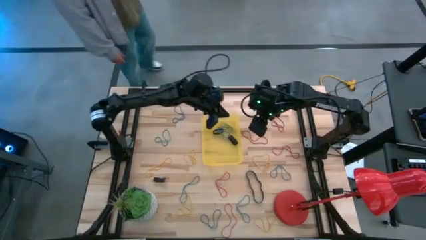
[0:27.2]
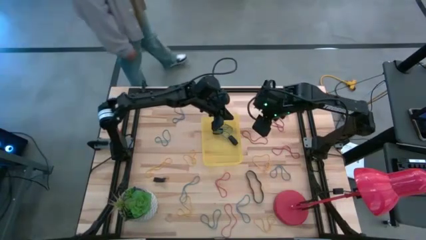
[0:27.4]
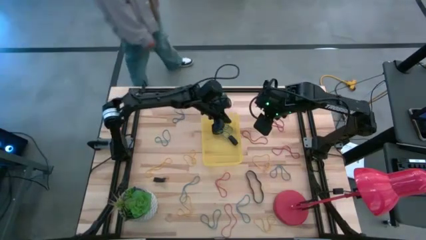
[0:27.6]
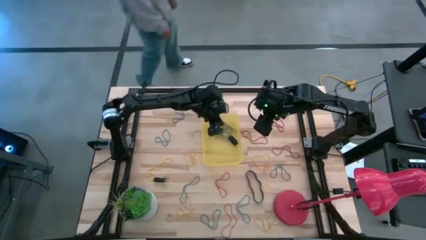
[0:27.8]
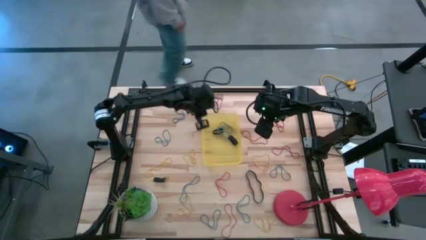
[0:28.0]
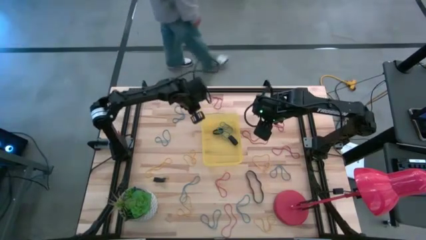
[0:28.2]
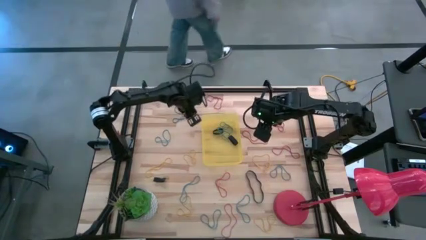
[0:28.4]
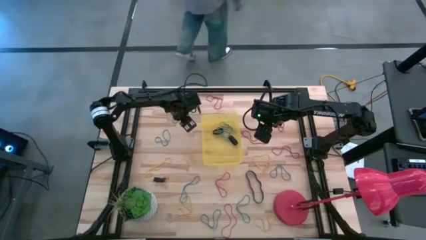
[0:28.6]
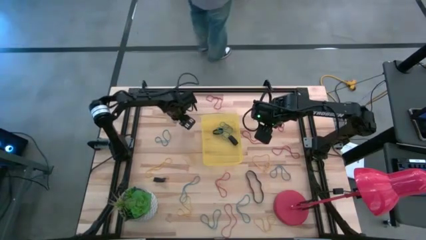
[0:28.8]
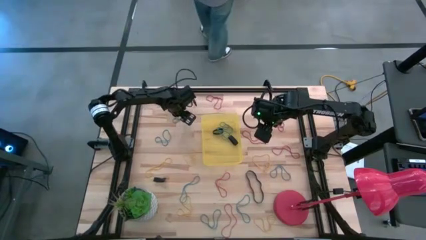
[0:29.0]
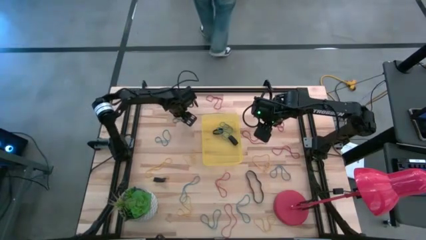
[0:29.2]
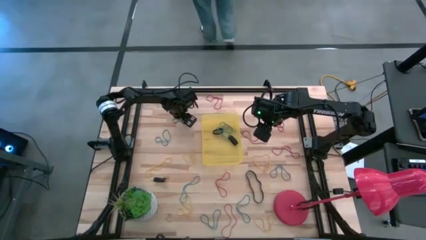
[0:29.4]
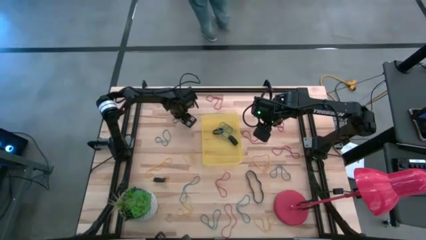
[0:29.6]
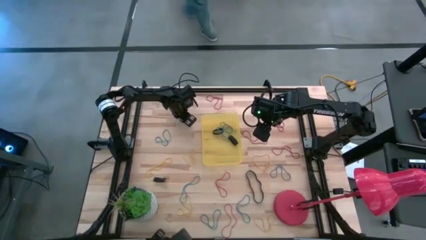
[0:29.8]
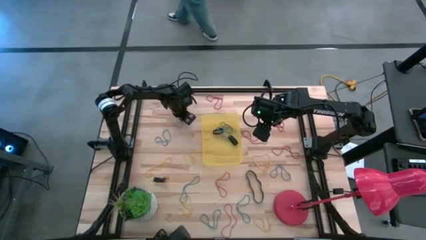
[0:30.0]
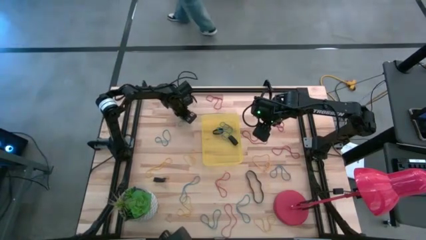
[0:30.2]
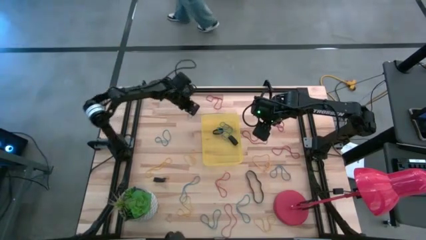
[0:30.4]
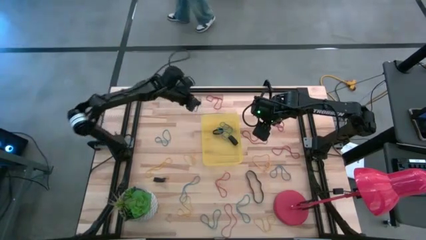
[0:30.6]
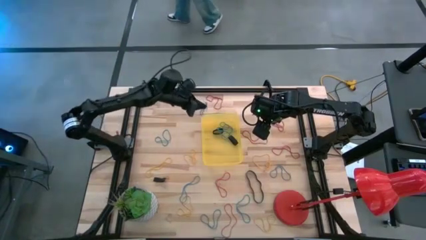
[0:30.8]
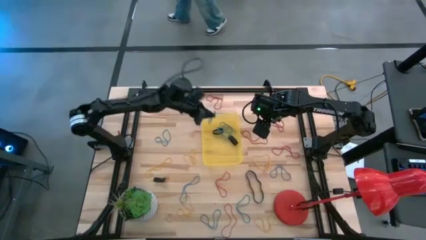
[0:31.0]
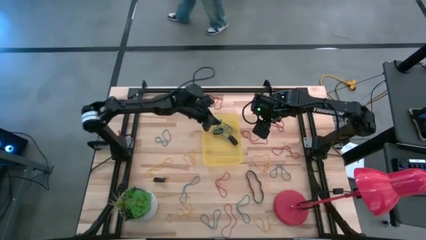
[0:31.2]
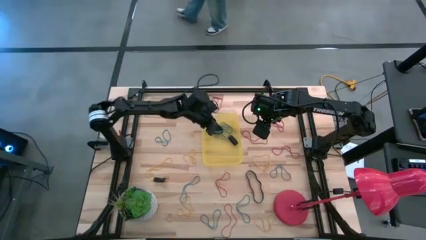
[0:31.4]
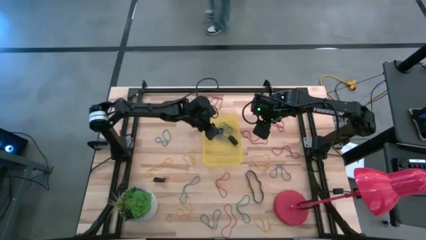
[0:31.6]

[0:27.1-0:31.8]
Task: Pick and place rubber bands into bin
Put the blue rubber band into the yellow bin

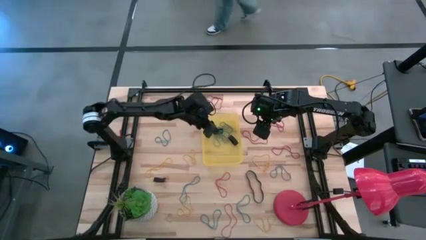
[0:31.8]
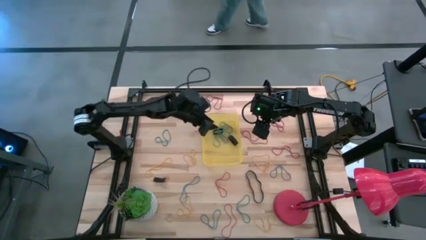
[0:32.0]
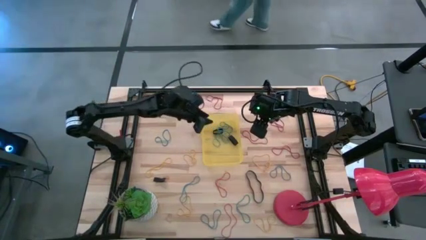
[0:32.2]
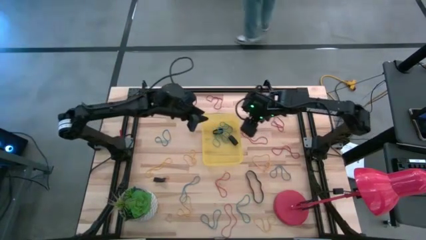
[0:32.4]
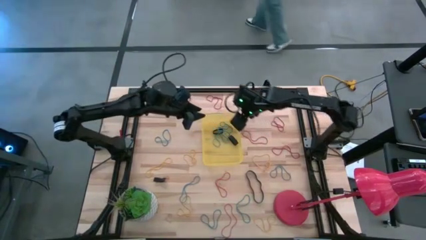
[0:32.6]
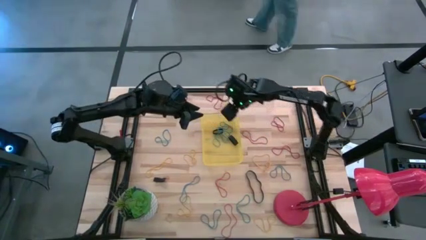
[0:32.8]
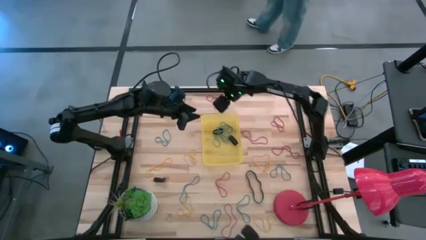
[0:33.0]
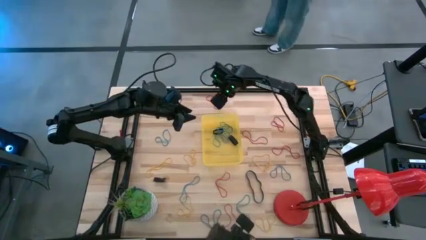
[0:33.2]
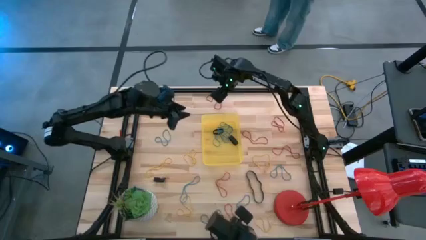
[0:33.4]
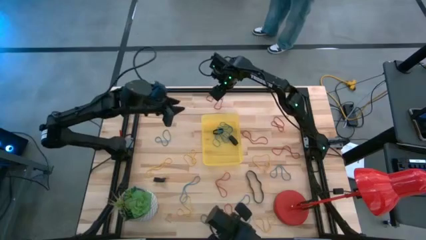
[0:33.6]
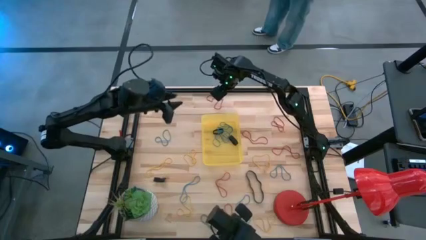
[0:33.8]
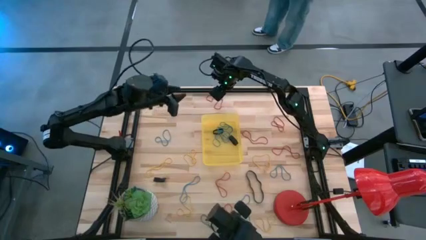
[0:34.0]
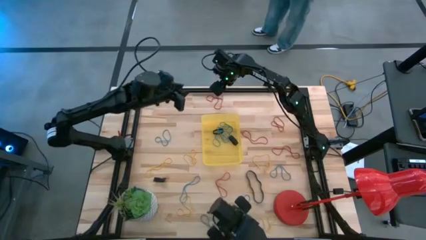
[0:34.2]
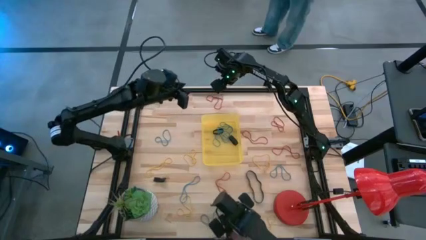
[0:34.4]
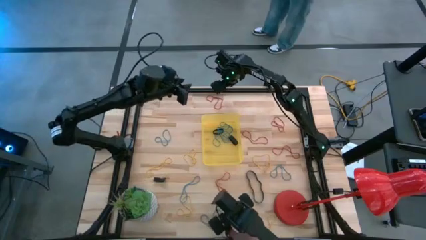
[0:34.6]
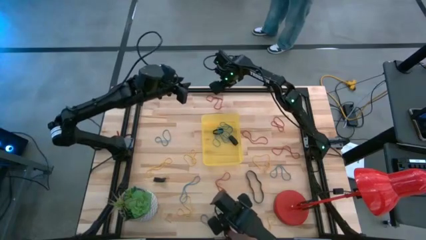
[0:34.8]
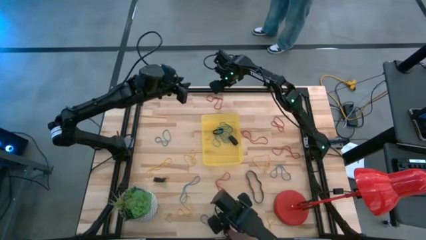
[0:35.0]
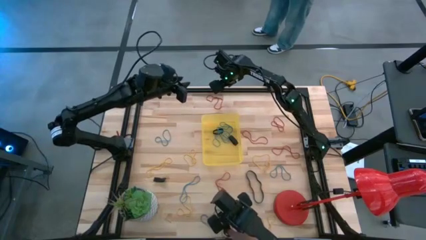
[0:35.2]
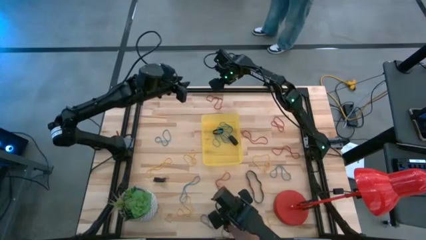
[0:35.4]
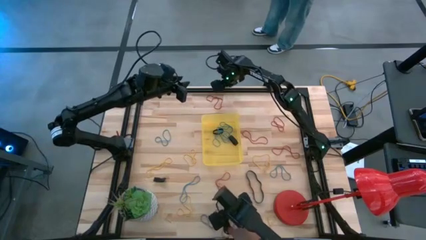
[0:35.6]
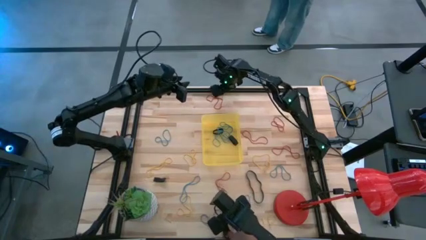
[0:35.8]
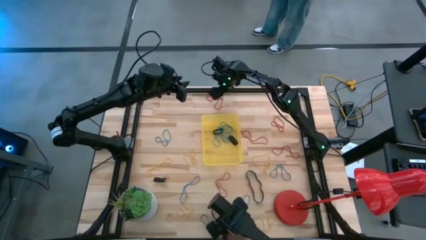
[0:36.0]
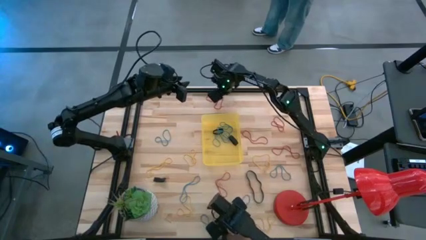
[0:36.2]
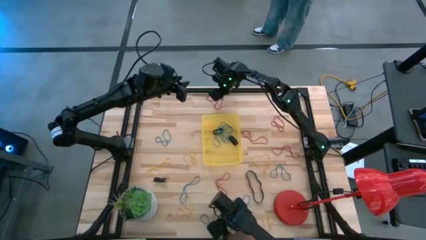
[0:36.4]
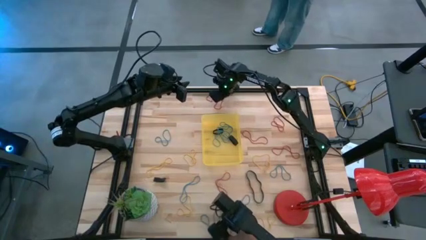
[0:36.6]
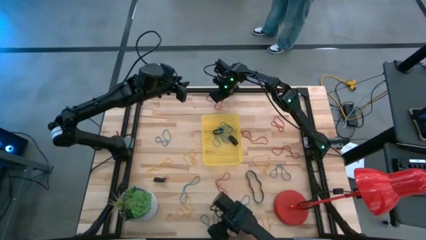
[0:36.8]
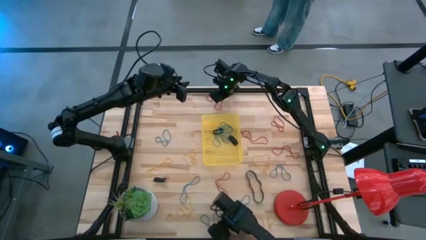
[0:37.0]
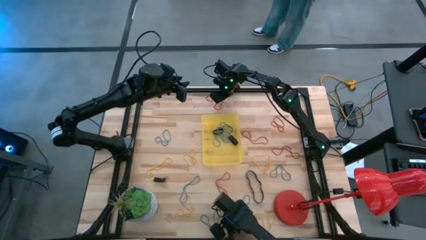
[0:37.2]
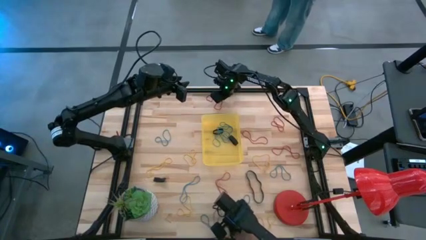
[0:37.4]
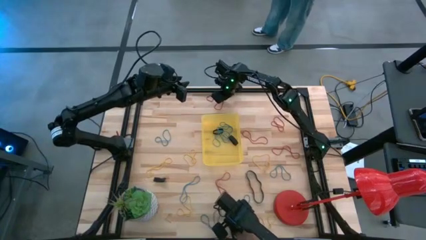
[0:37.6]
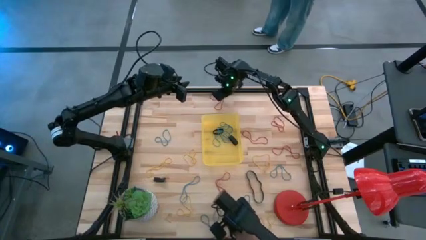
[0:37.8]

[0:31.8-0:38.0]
Put the red rubber band into the yellow bin

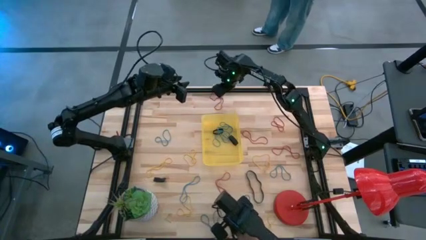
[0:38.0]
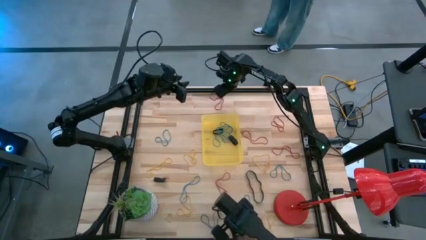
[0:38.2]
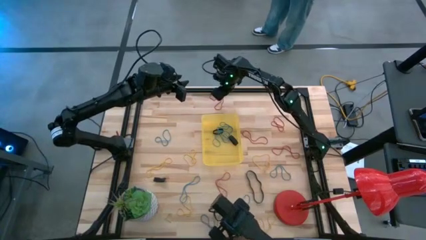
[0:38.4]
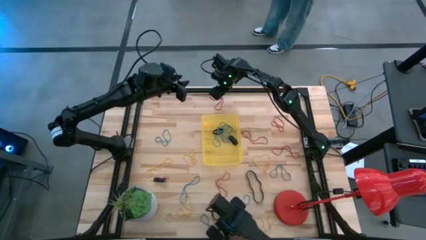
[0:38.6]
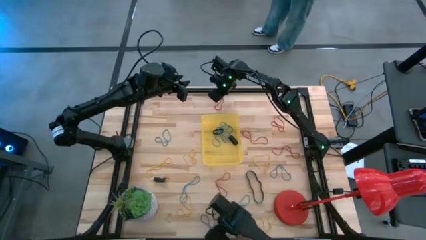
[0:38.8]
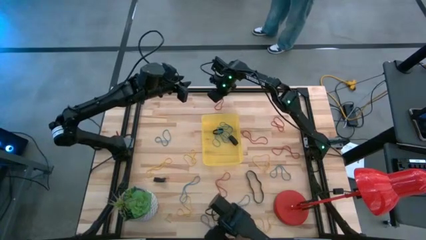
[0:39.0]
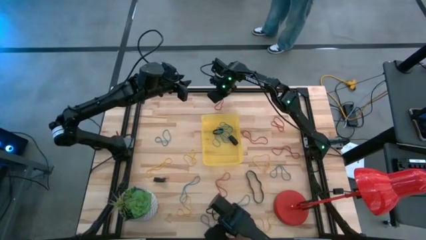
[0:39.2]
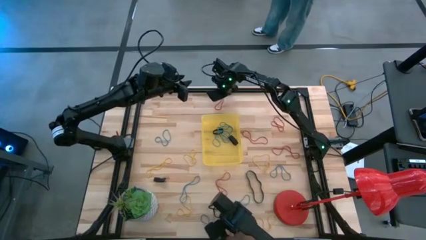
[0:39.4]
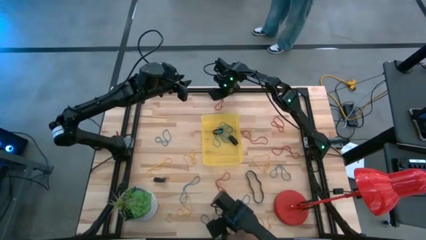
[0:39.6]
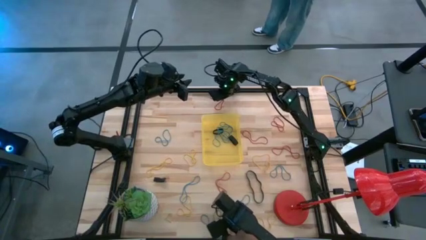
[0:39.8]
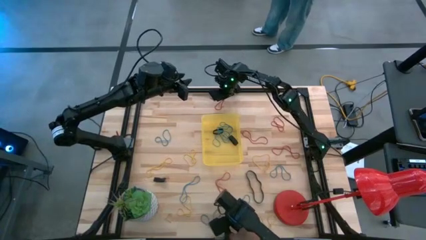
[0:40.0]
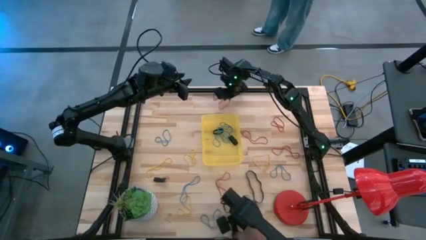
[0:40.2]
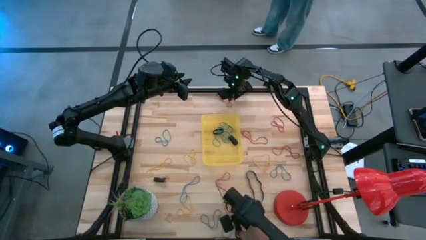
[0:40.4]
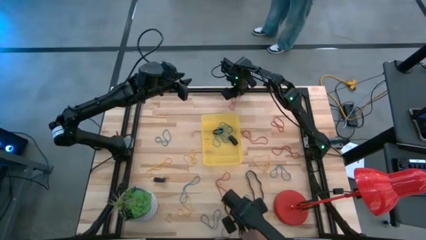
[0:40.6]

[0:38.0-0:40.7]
Move the red rubber band to the right

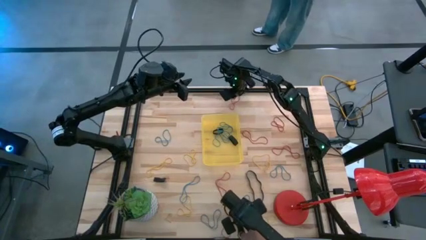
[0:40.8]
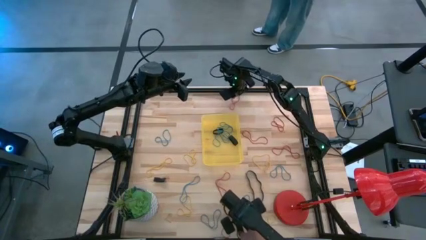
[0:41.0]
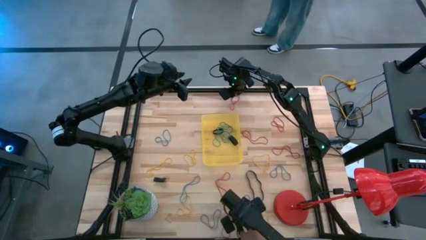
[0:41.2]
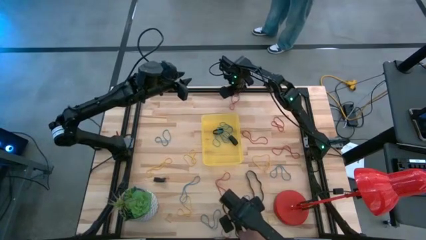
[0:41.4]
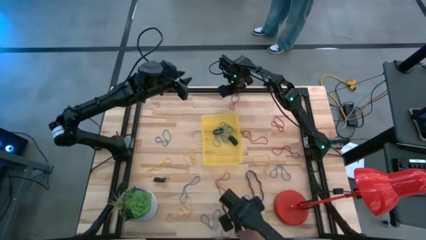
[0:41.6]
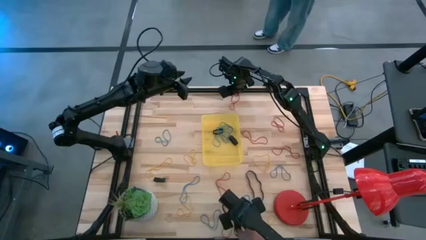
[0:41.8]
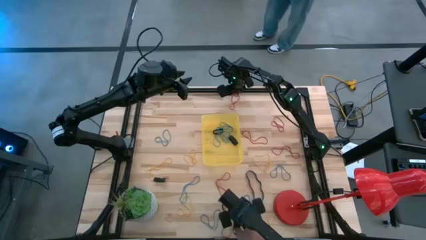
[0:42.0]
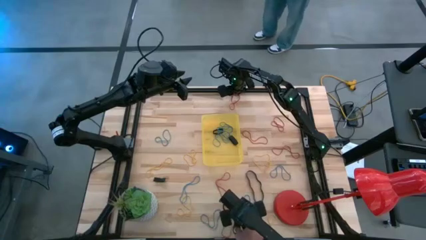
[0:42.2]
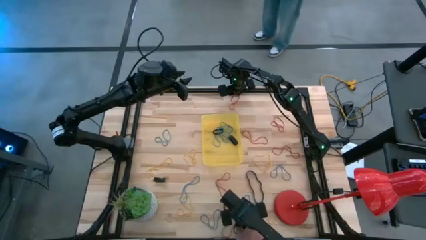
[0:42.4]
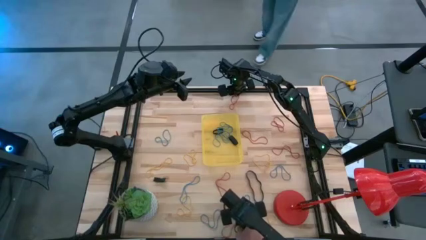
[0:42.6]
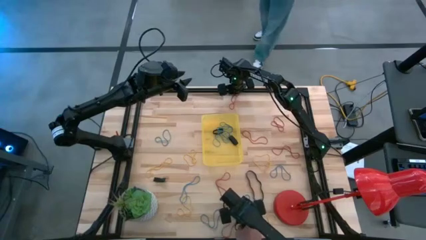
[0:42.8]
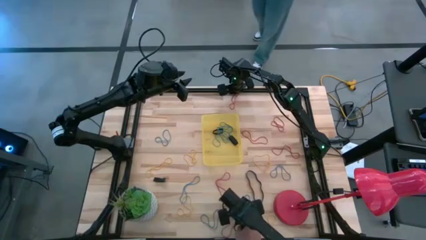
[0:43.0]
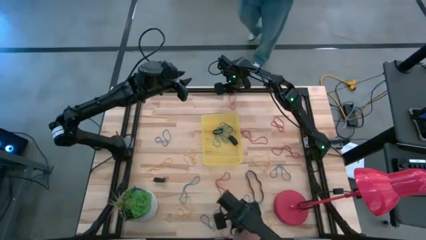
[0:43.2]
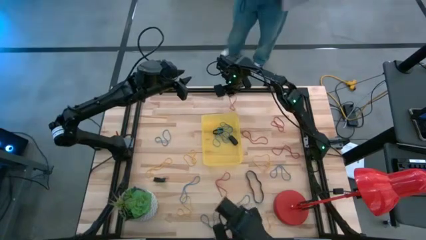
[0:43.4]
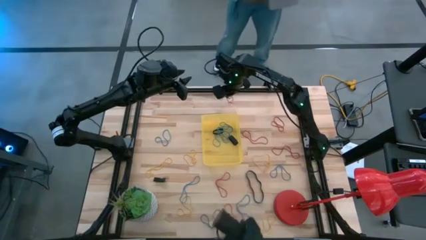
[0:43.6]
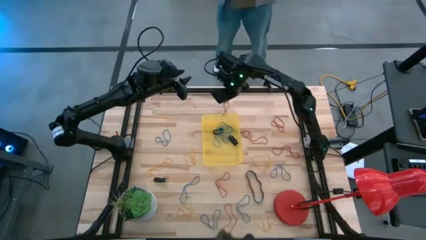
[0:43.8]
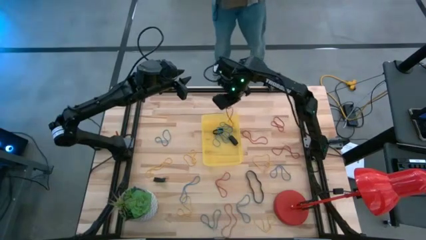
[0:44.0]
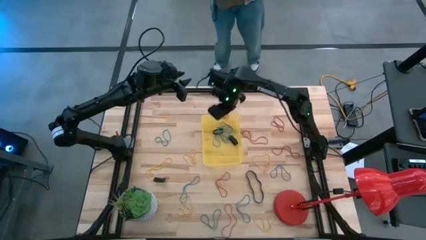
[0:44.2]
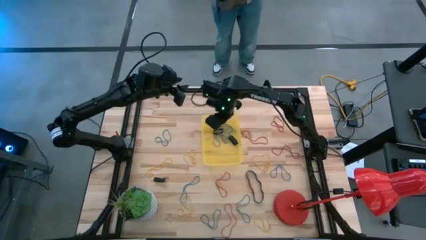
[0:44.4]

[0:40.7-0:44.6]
Put the red rubber band into the yellow bin
